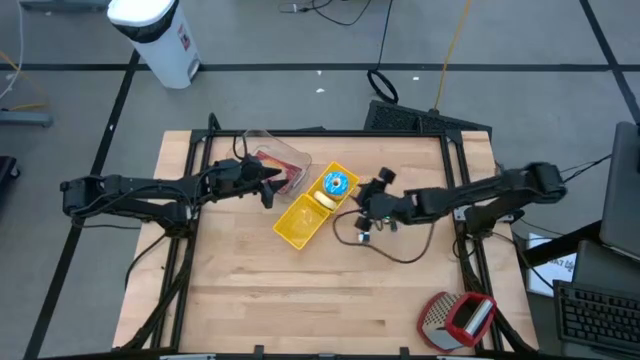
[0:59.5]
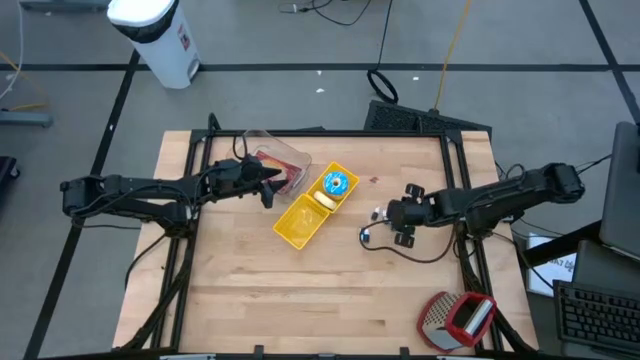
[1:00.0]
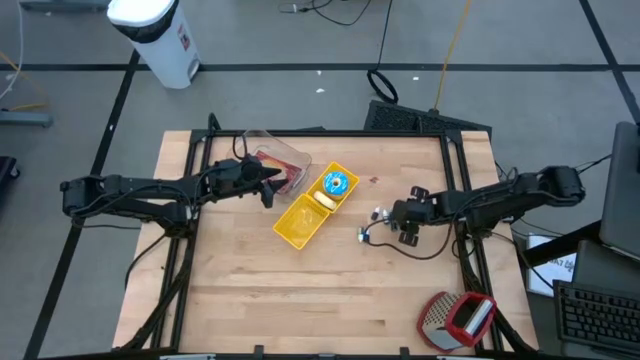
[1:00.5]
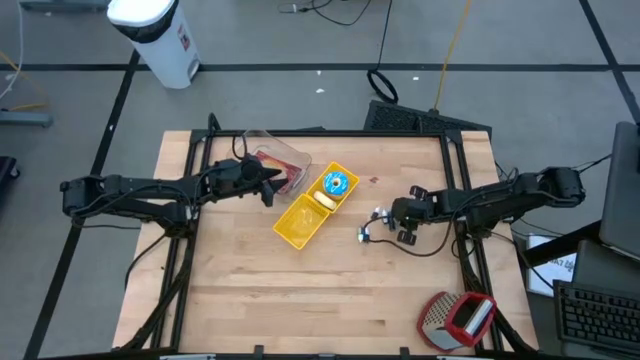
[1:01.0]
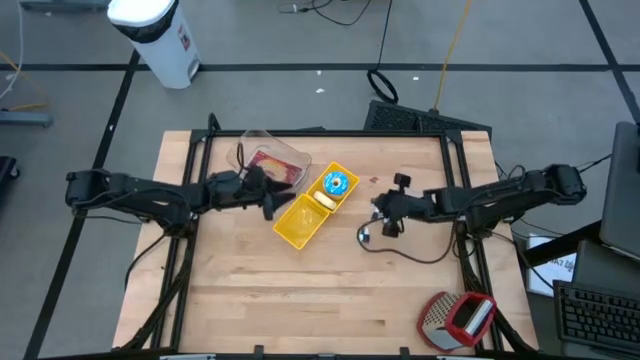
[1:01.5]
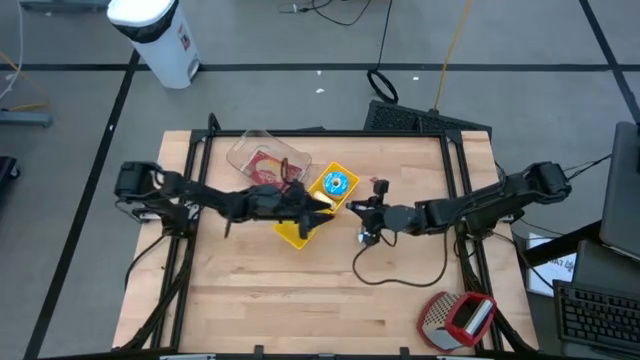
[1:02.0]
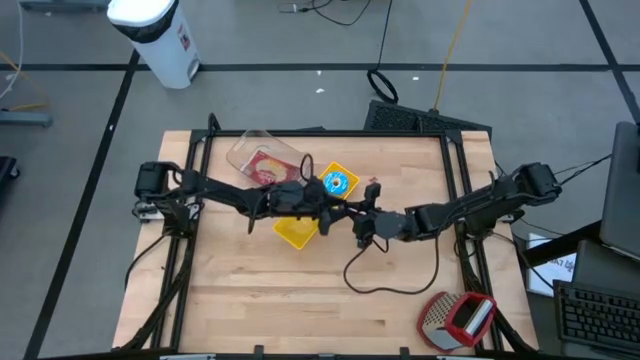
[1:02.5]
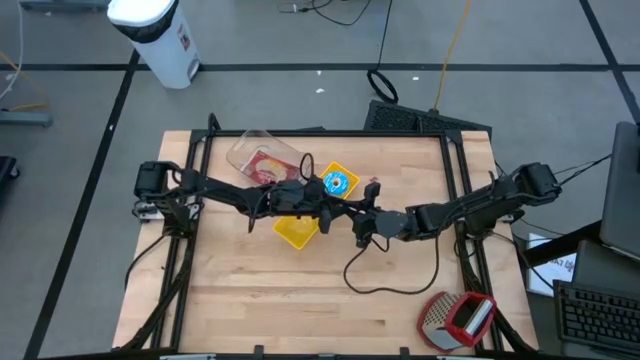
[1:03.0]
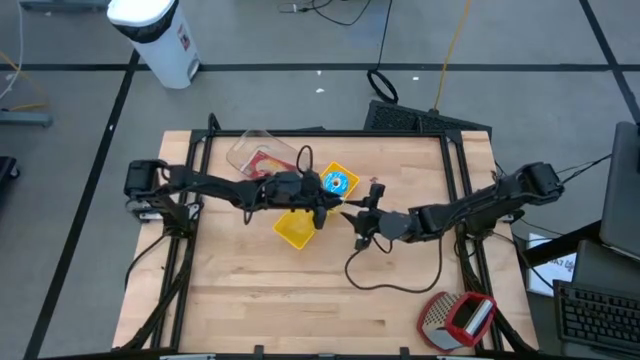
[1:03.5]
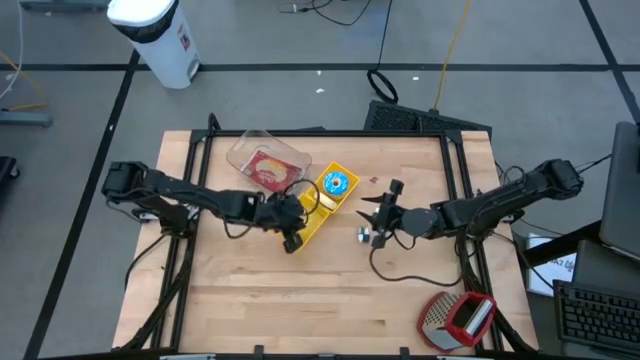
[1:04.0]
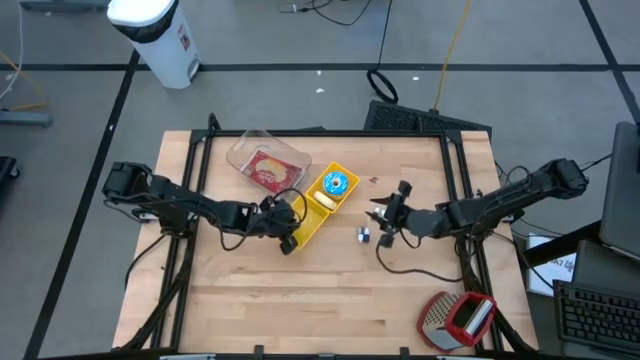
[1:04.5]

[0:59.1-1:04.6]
Put the purple food coloring bottle into the bottom yellow bin

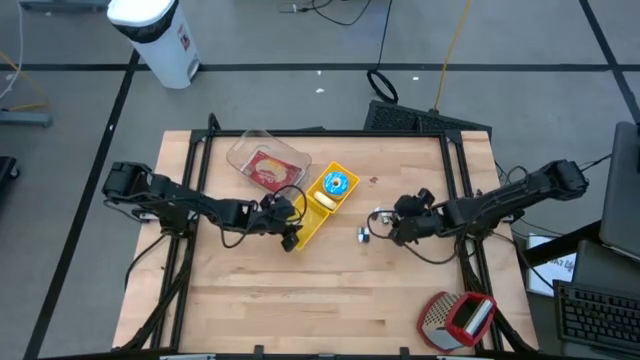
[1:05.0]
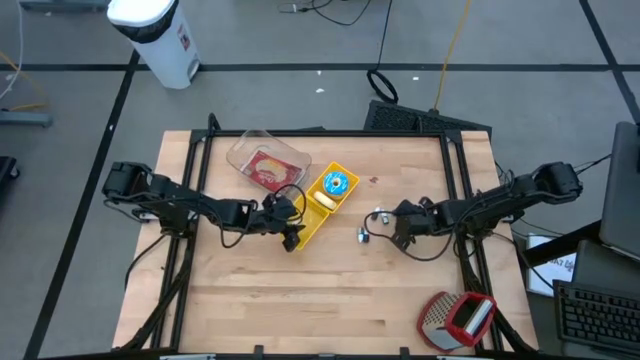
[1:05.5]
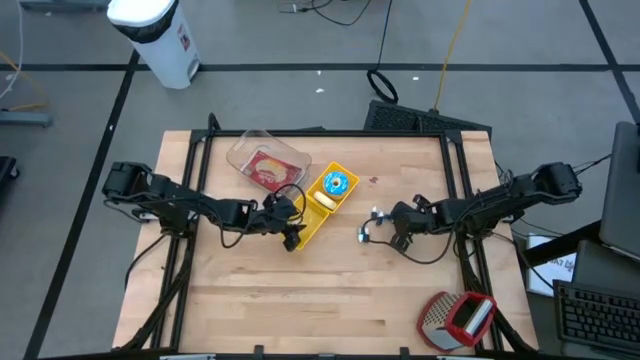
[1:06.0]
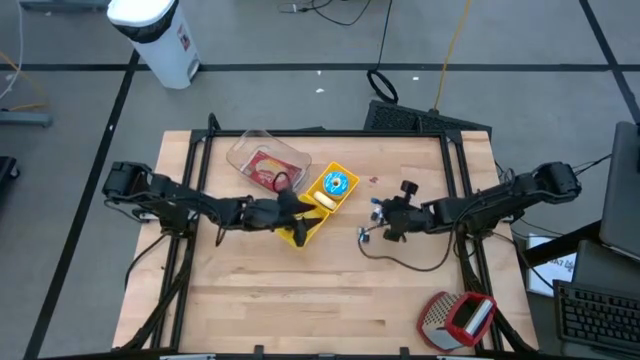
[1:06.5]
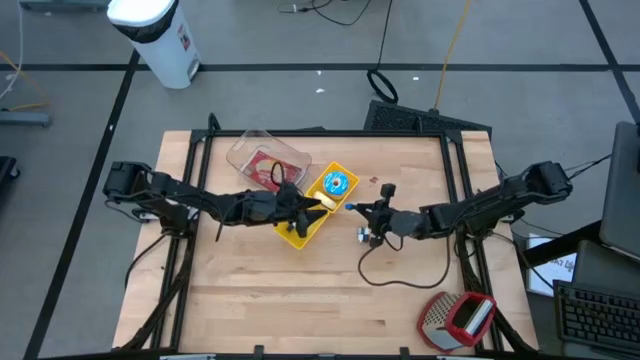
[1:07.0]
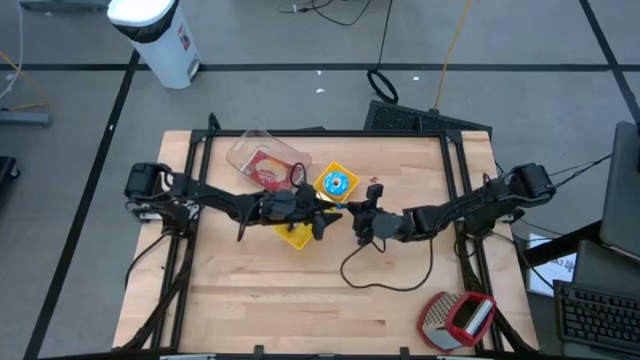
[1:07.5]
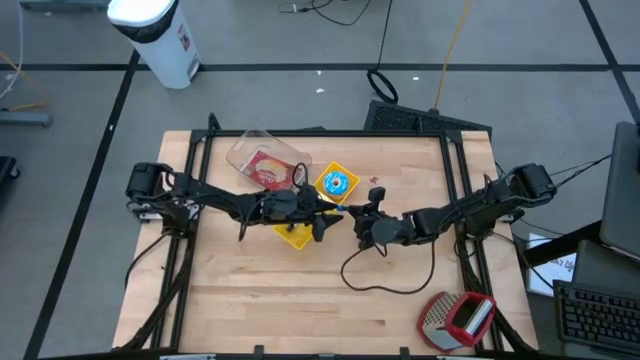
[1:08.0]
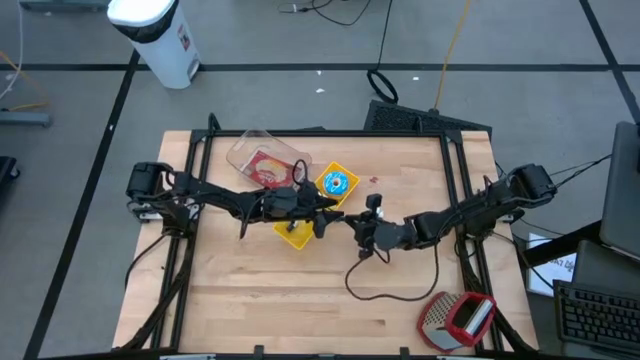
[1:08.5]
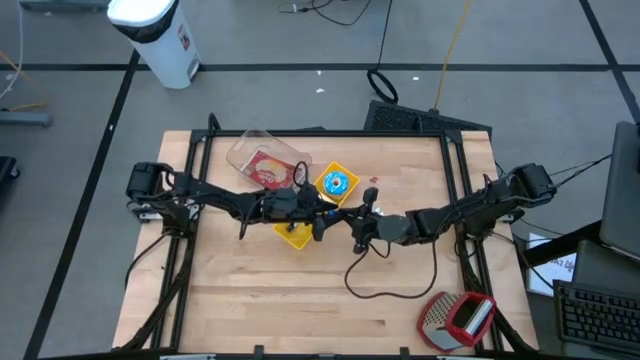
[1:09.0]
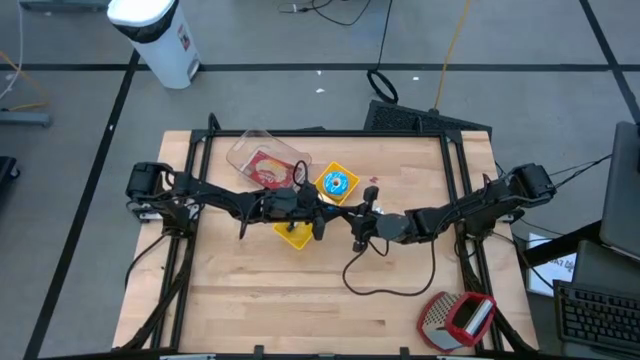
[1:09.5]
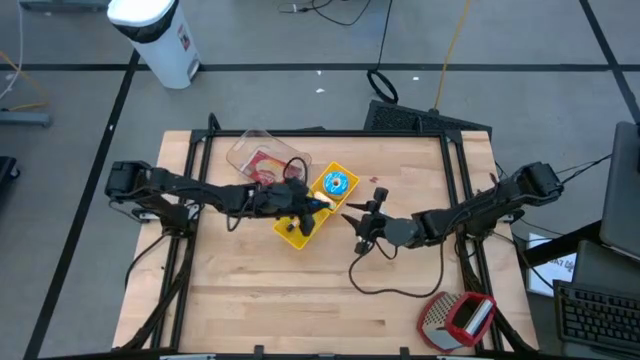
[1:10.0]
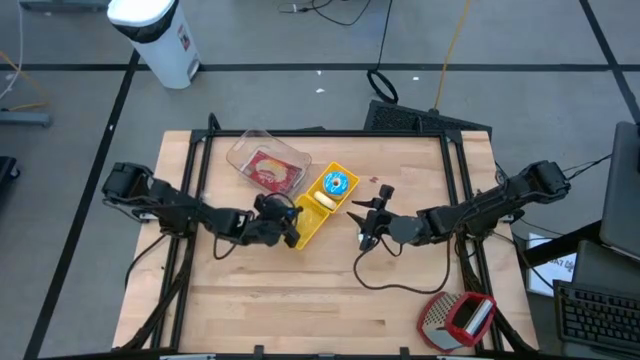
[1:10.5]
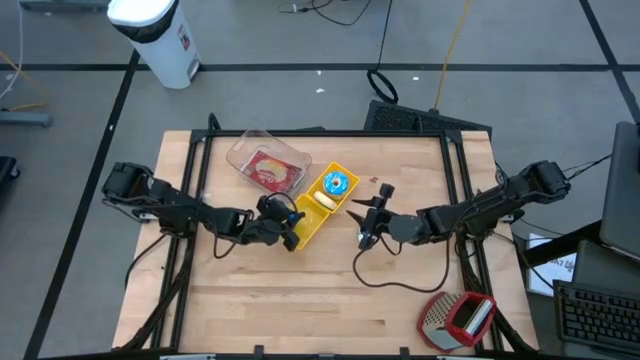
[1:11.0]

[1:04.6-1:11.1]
Put the blue food coloring bottle into the bottom yellow bin

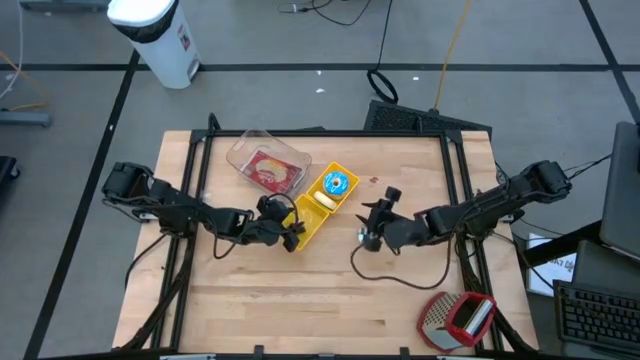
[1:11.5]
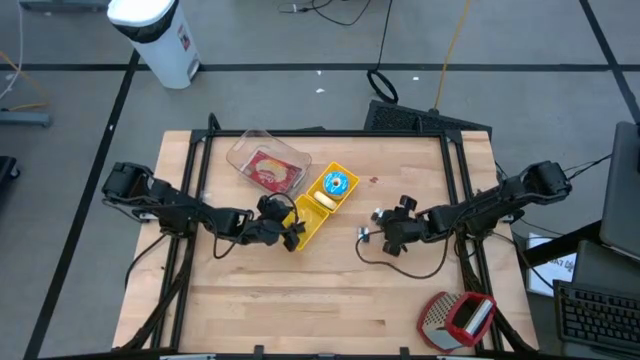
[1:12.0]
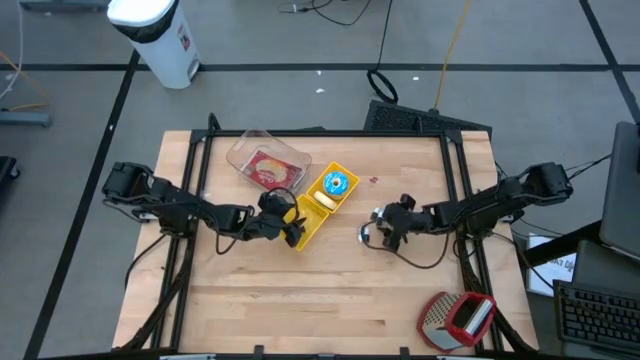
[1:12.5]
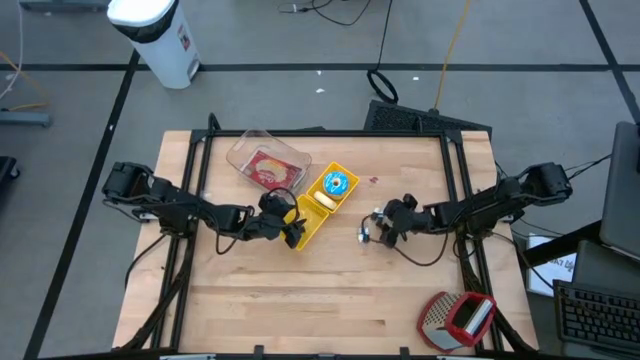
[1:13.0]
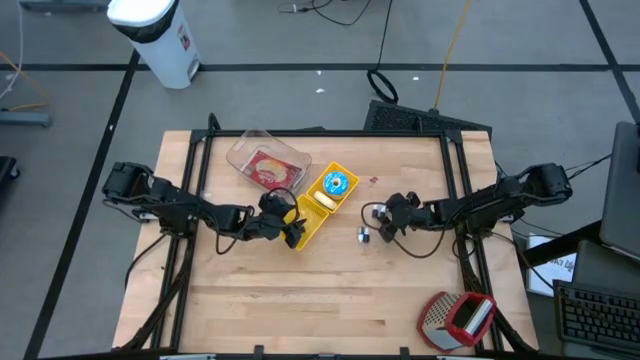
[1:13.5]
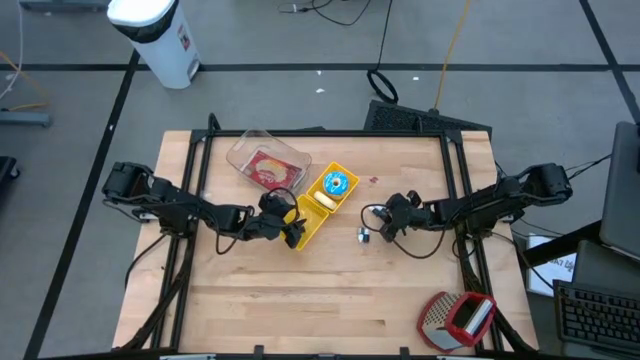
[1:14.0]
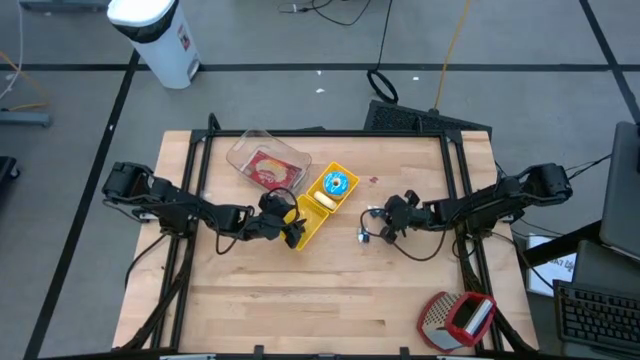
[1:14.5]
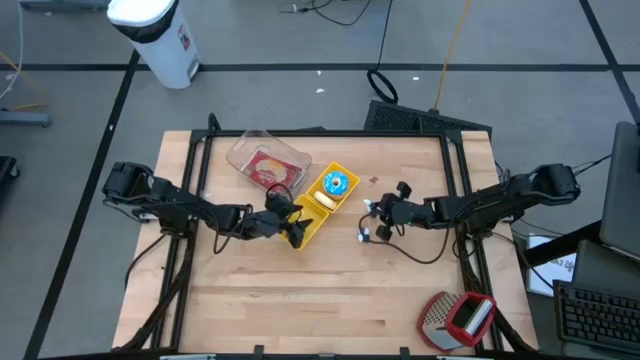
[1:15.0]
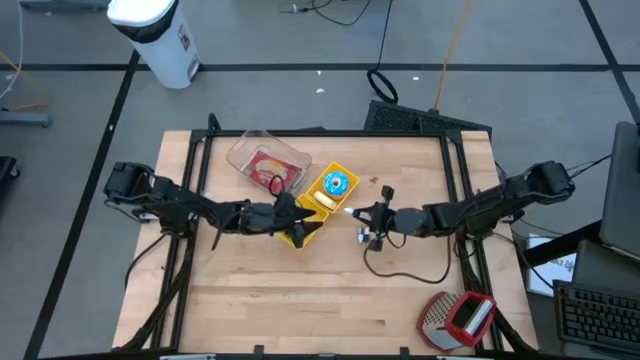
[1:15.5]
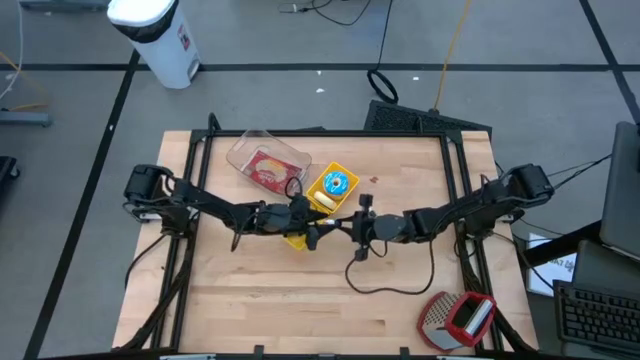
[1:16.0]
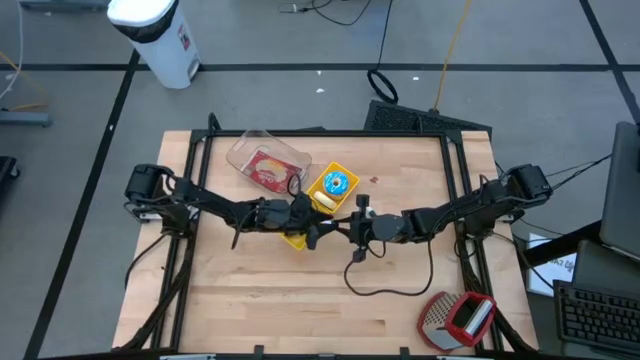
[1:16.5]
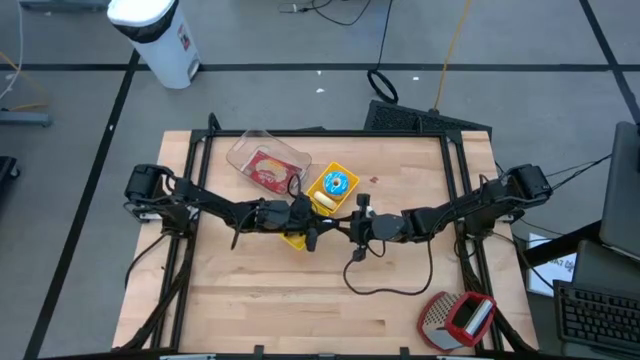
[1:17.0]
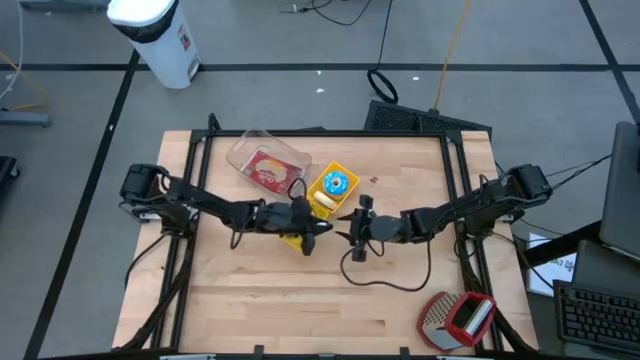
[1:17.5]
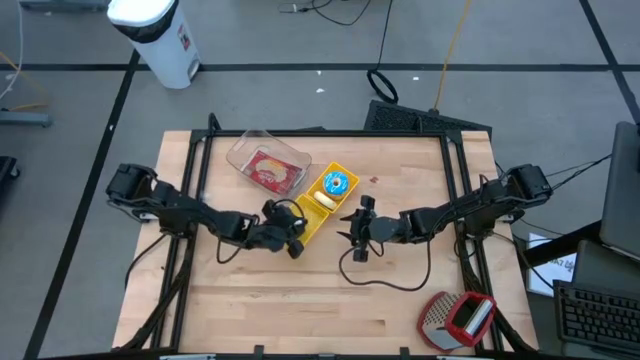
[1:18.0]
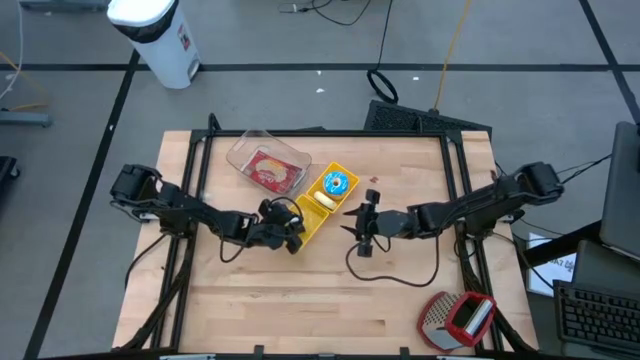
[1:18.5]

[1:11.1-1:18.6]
Put the brown food coloring bottle into the bottom yellow bin
